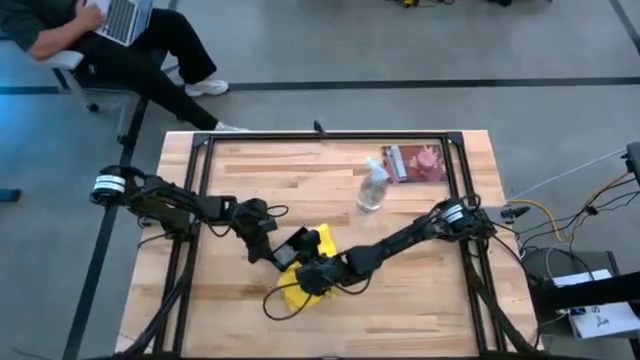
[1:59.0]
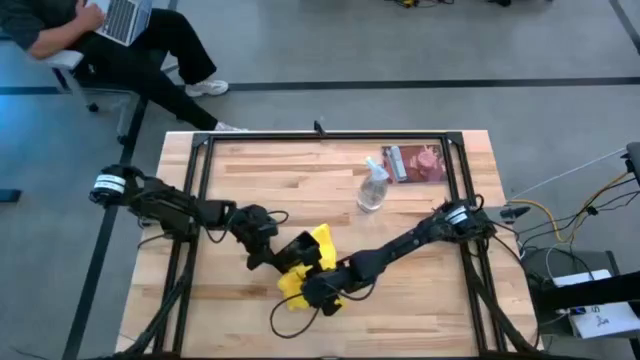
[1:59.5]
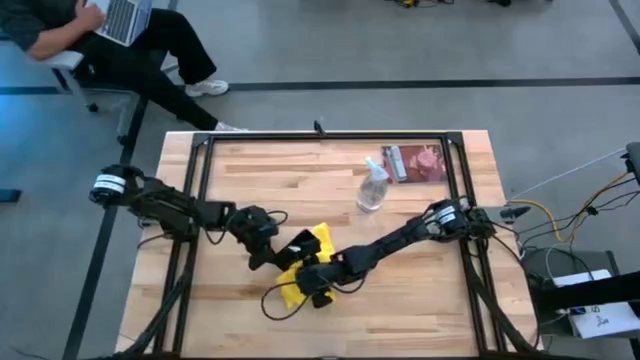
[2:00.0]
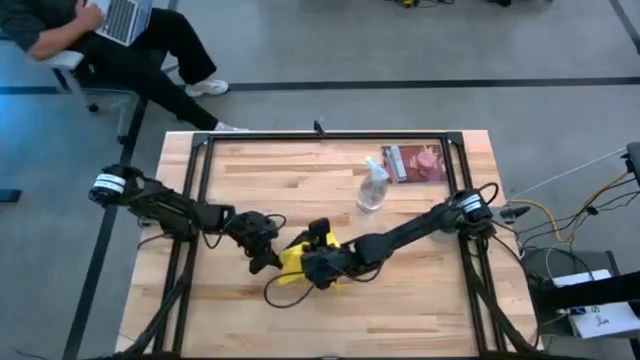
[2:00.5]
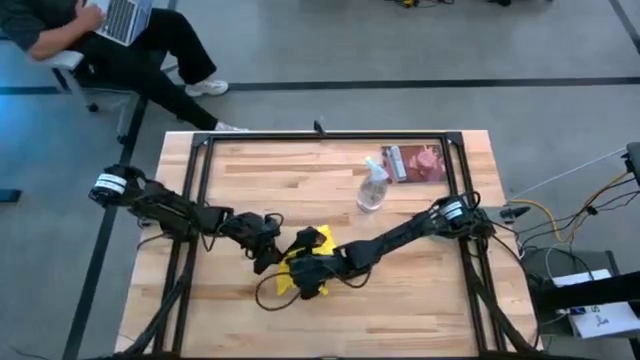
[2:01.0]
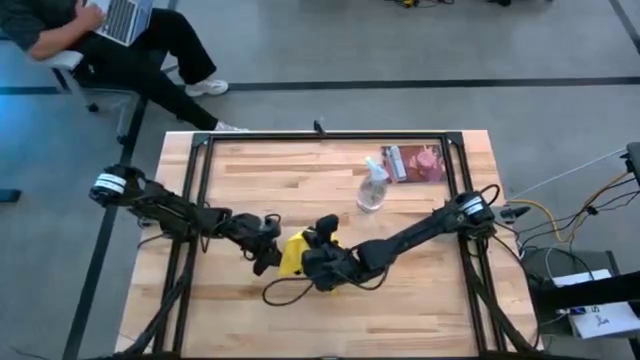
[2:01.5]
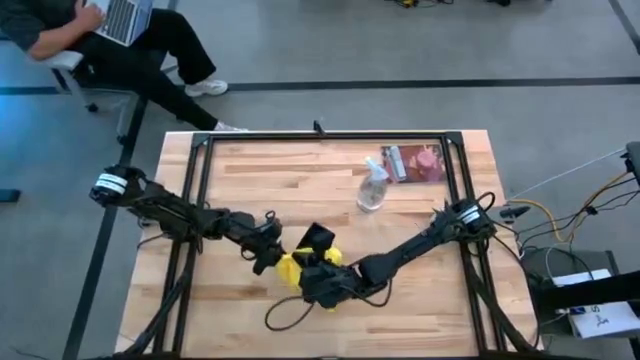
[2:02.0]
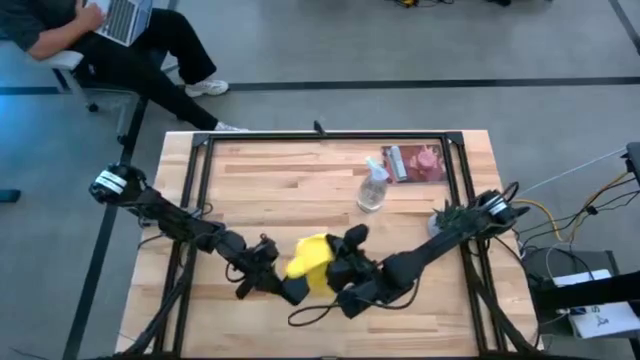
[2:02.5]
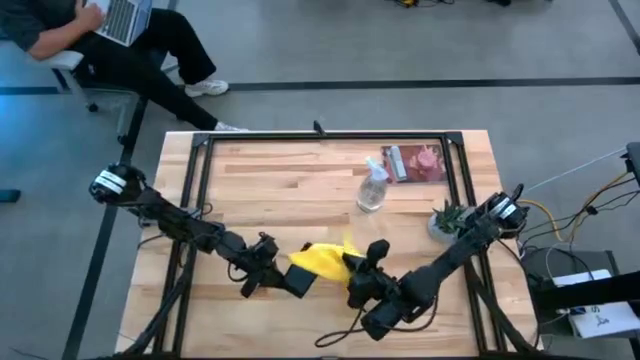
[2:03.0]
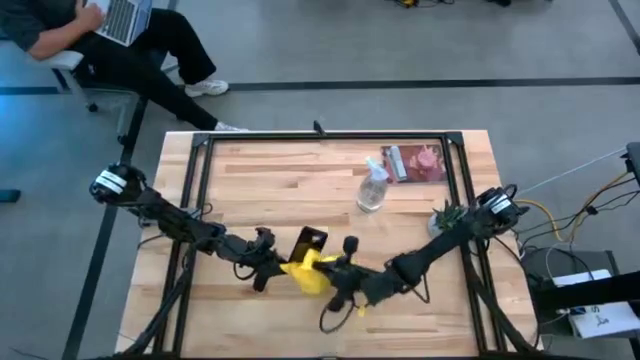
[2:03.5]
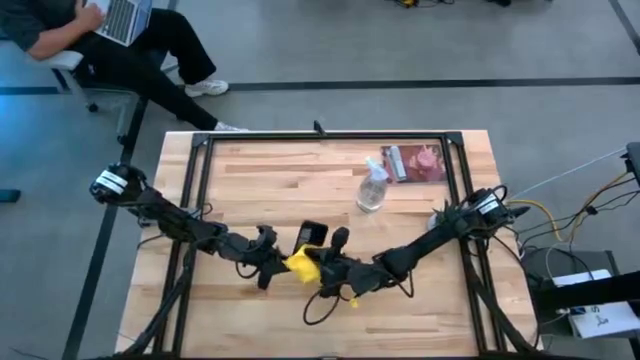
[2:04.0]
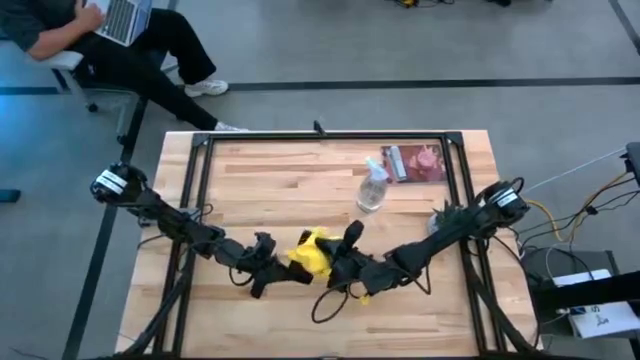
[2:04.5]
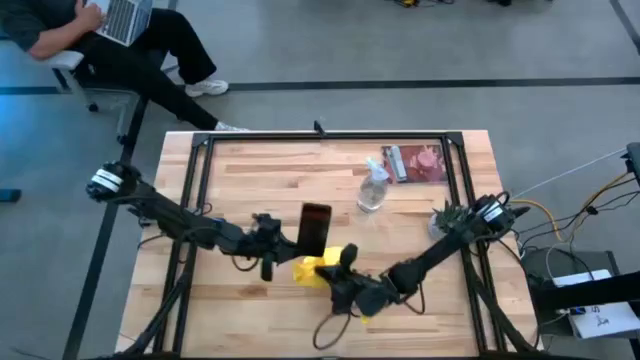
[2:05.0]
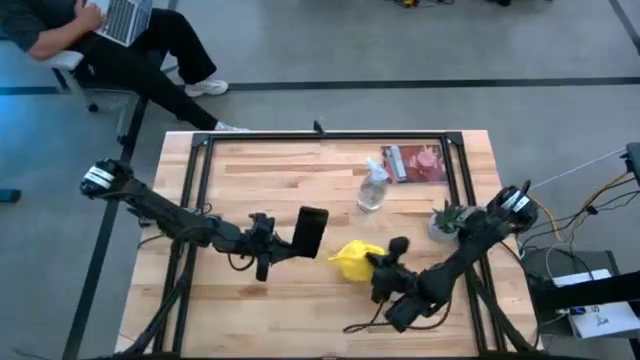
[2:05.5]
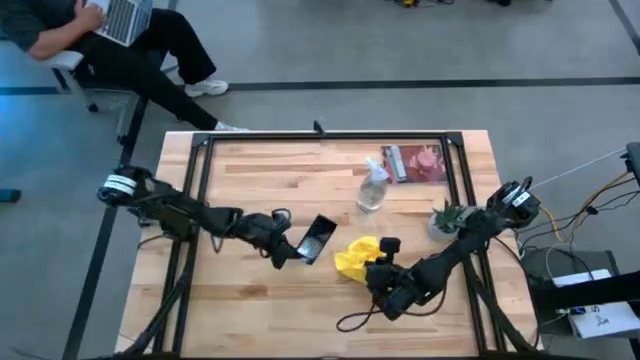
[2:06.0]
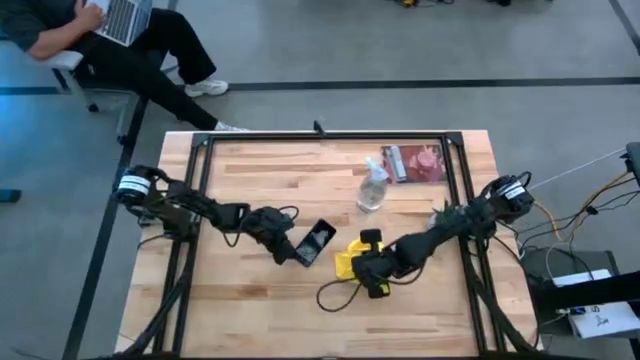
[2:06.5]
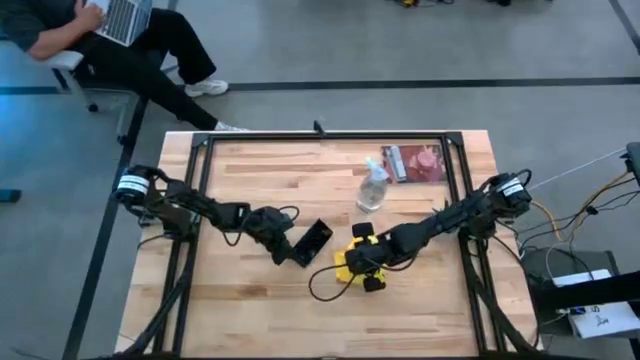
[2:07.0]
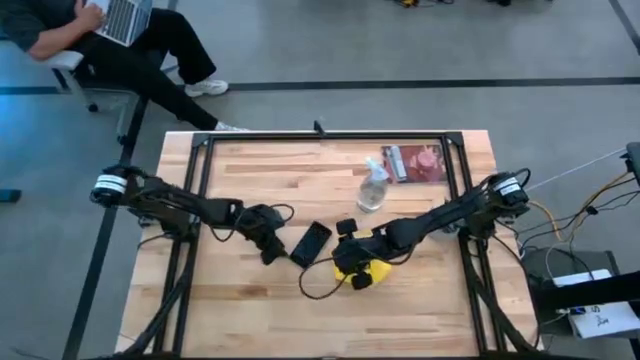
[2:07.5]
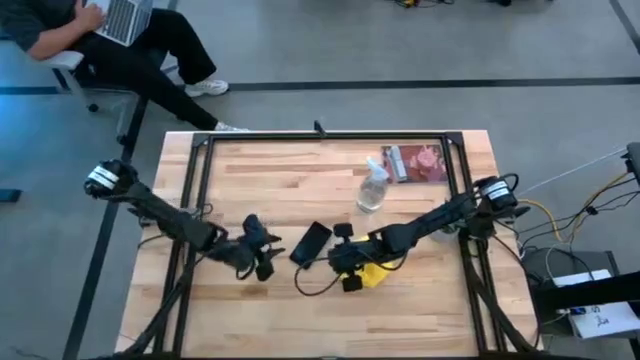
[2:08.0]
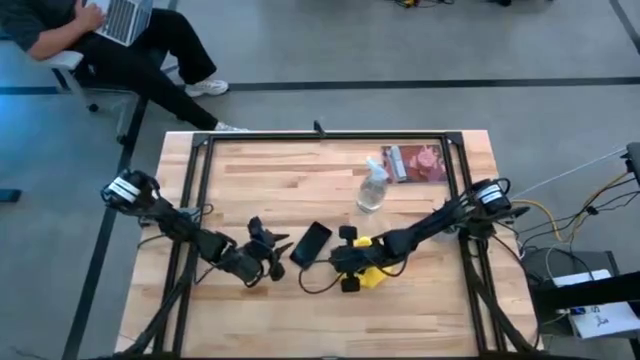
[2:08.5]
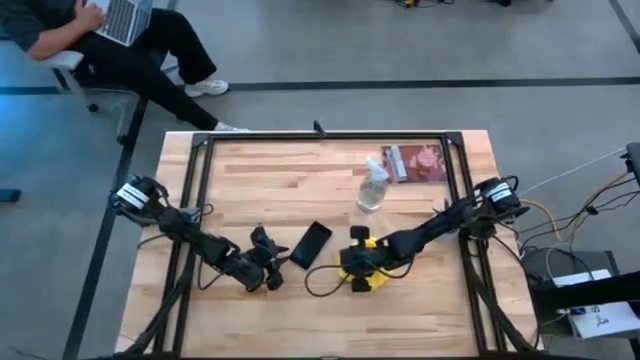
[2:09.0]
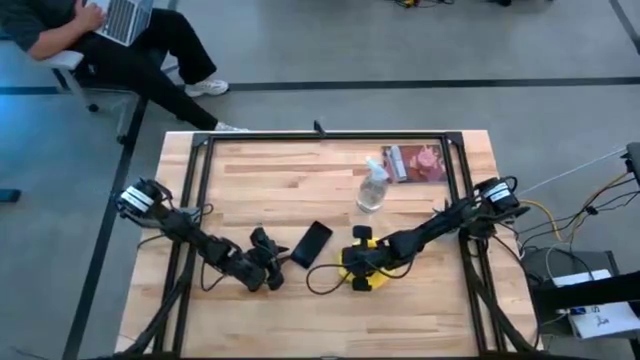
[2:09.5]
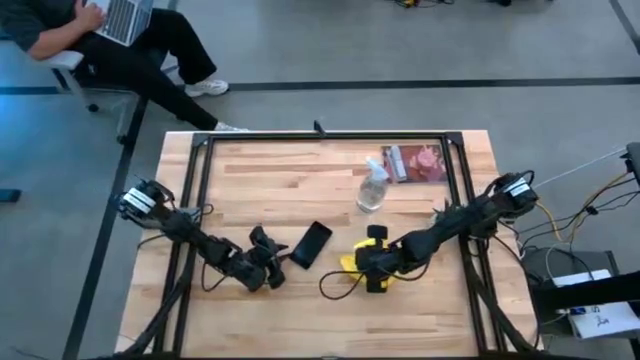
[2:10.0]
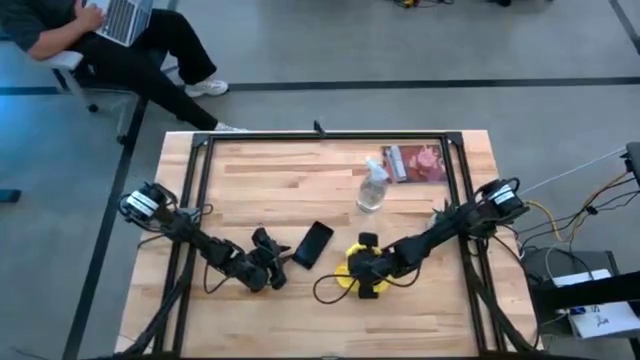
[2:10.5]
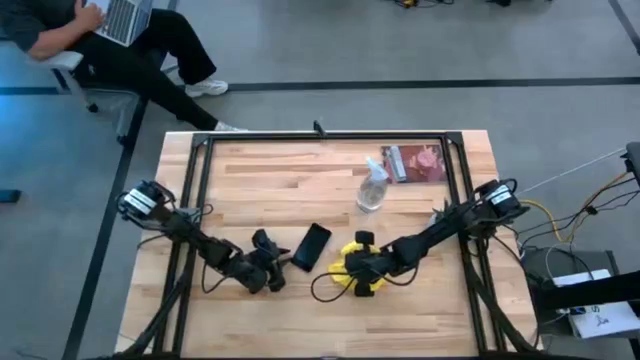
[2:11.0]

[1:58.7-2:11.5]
Task: Apply microfiber cloth
Wipe the black cellphone with the yellow microfiber cloth

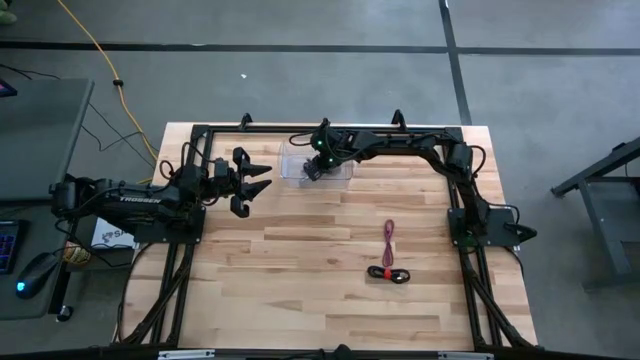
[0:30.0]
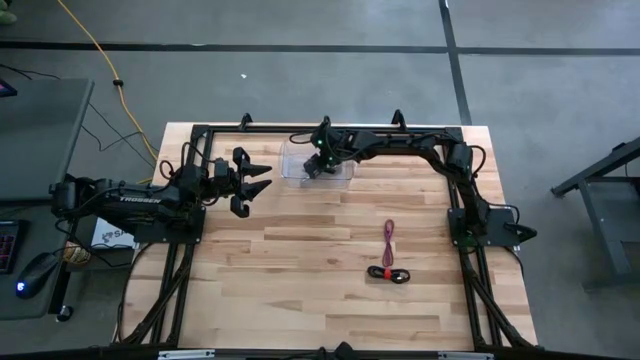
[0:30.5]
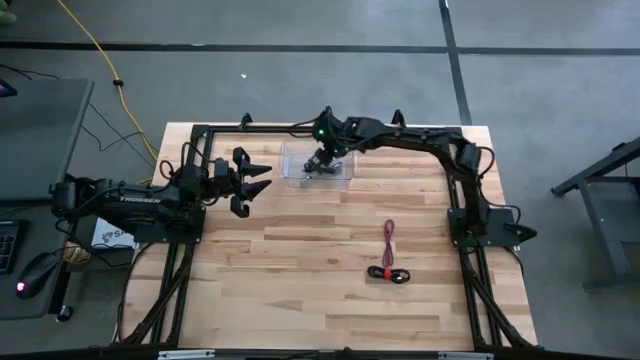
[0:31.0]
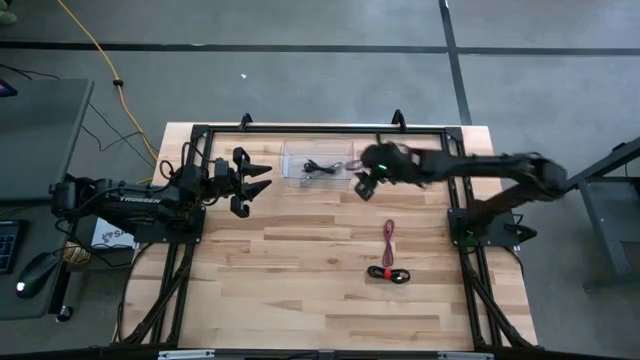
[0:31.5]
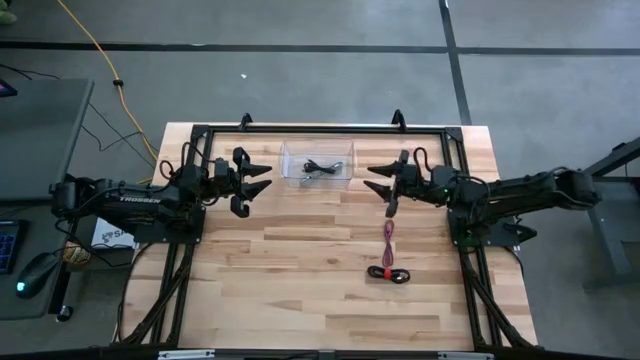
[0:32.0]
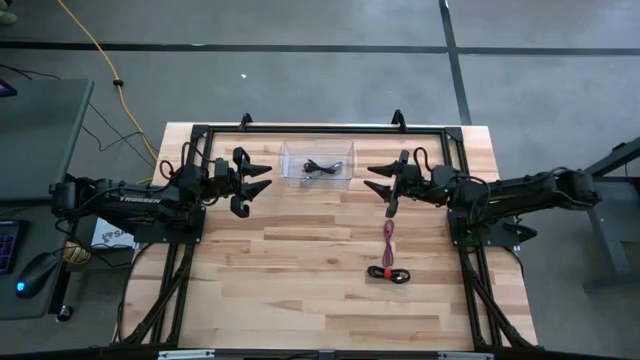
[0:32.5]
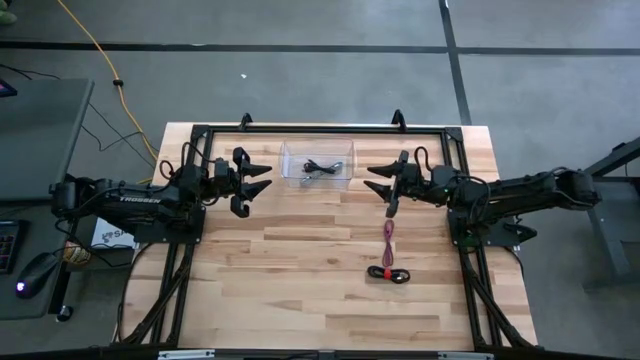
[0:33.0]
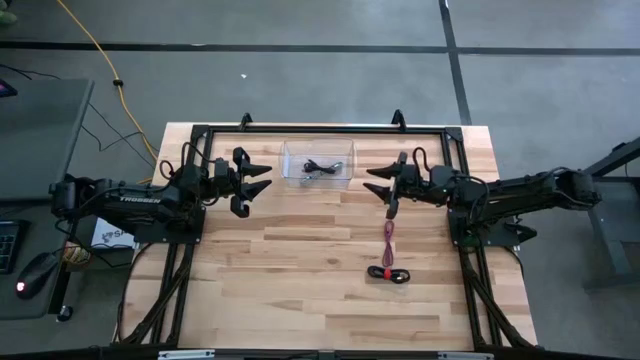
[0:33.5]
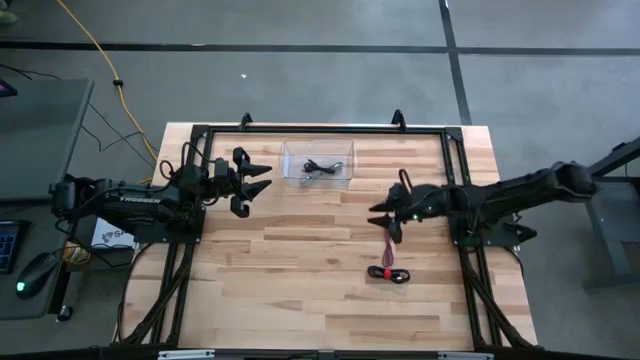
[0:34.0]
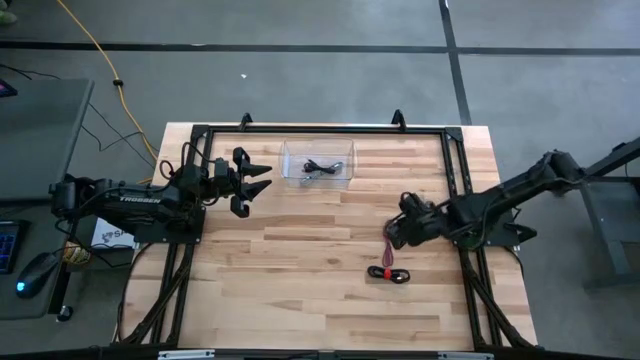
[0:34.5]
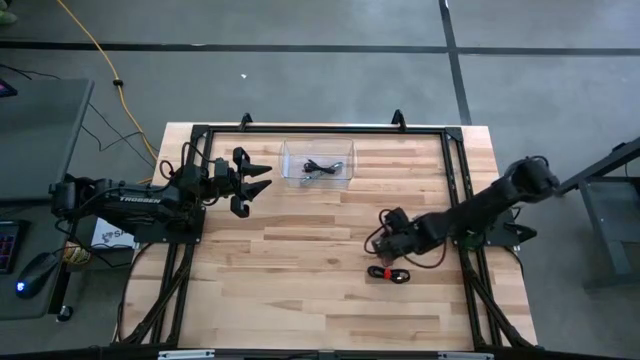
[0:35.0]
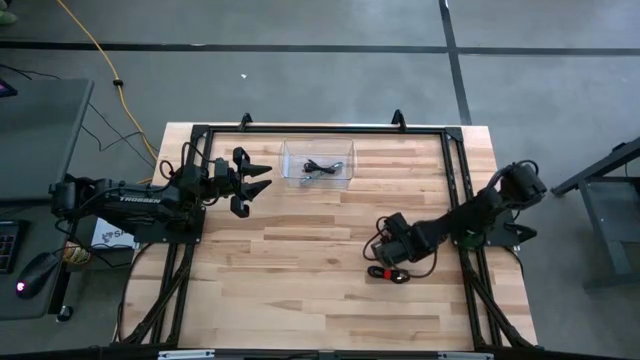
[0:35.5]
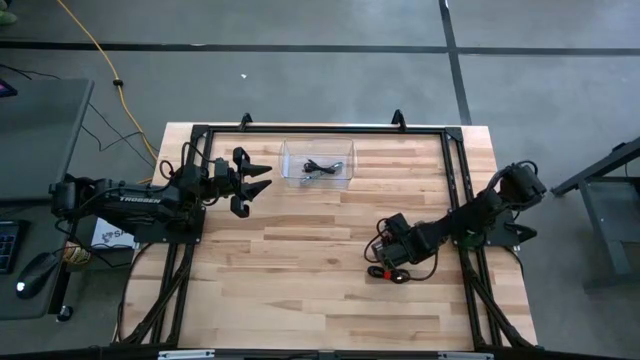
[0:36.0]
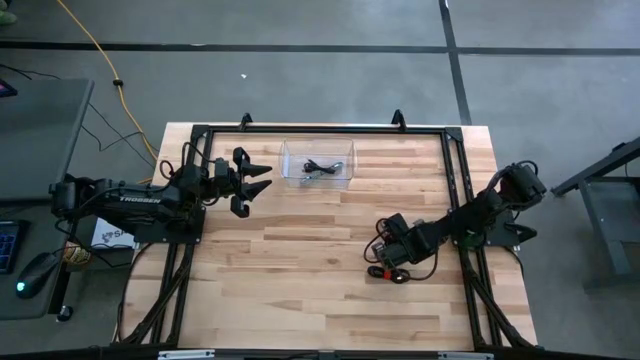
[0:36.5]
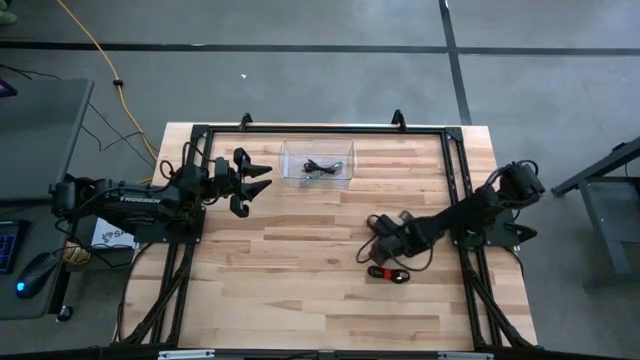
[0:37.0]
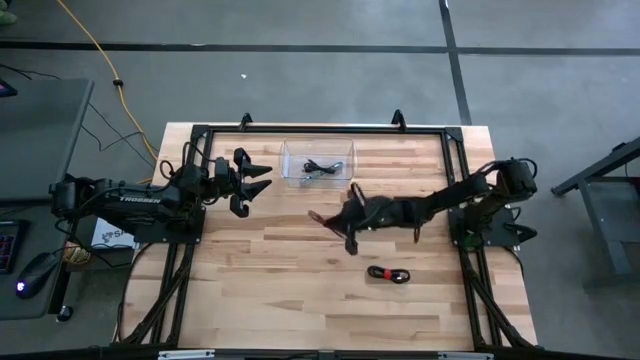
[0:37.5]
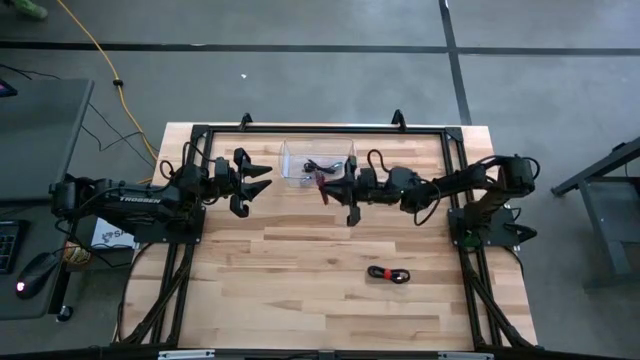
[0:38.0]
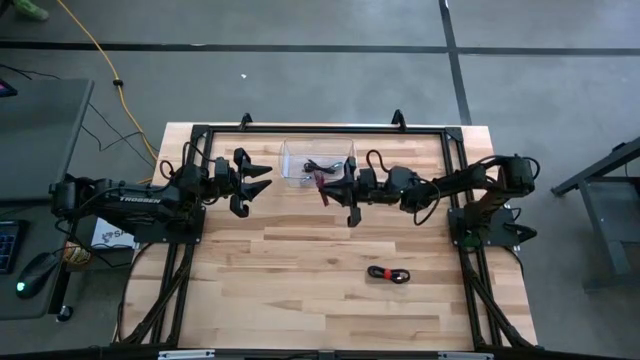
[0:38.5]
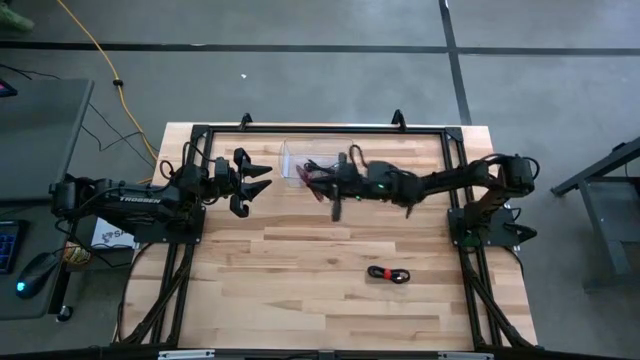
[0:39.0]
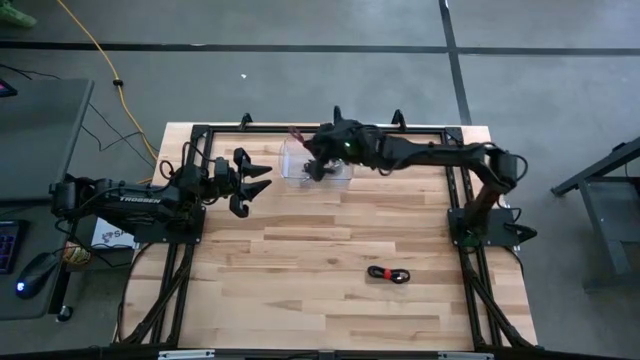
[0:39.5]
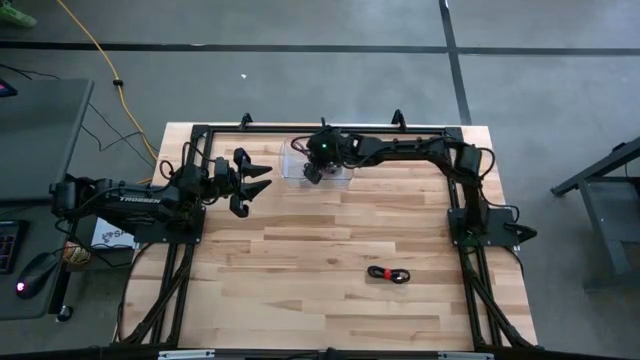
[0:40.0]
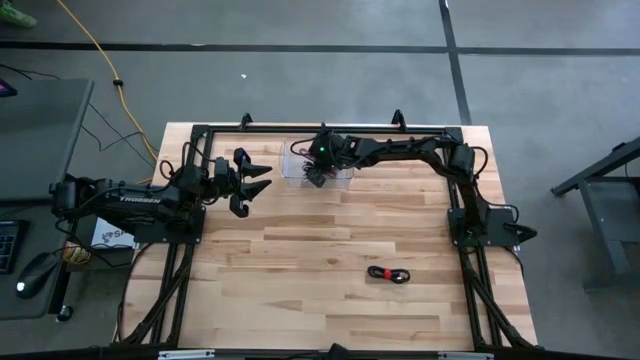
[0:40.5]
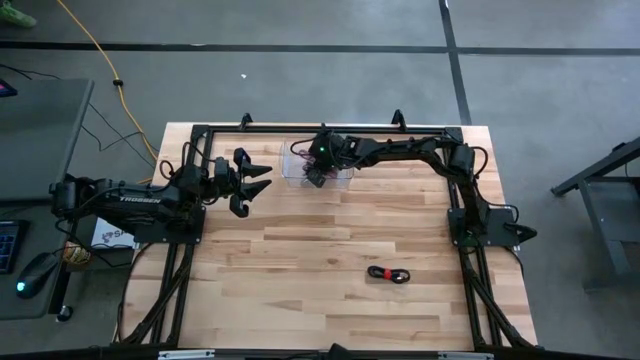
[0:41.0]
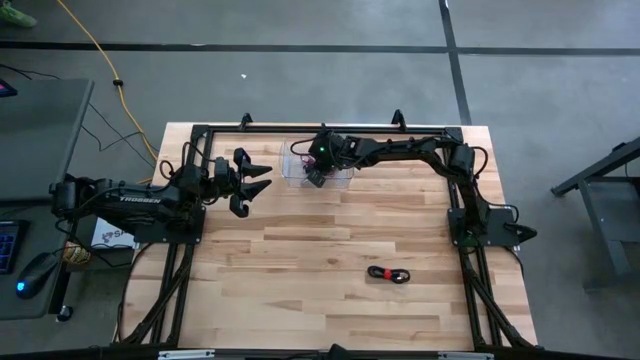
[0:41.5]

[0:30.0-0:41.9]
Task: Pick and place USB-C Cables
Put the pink charger cable into the transparent bin
